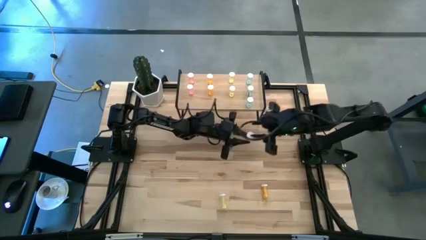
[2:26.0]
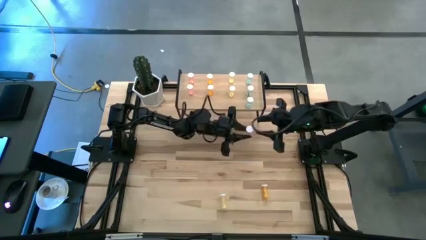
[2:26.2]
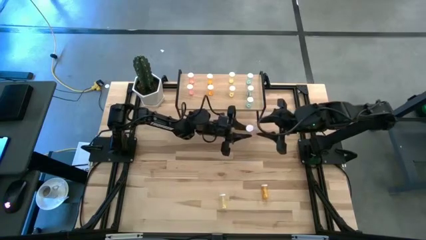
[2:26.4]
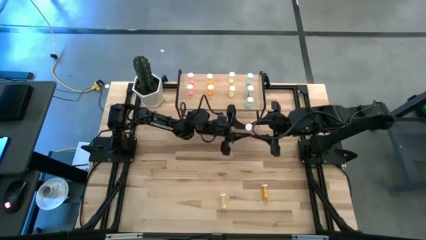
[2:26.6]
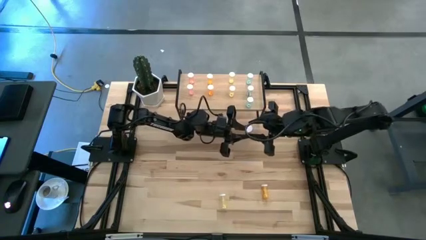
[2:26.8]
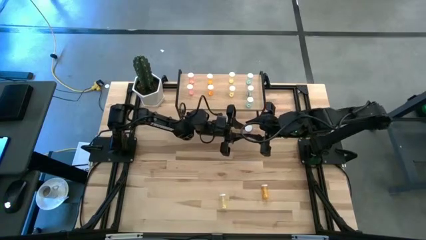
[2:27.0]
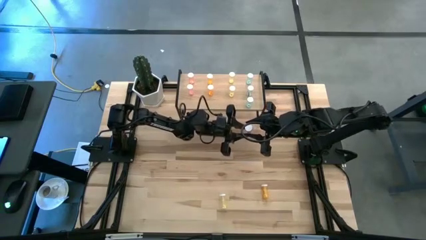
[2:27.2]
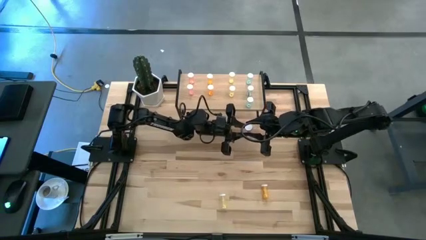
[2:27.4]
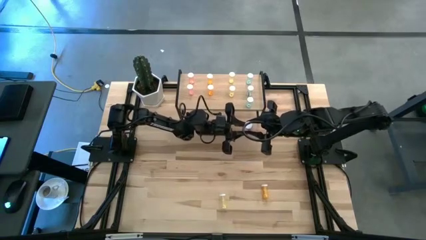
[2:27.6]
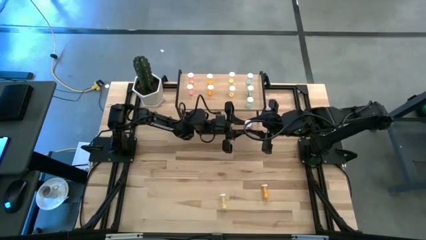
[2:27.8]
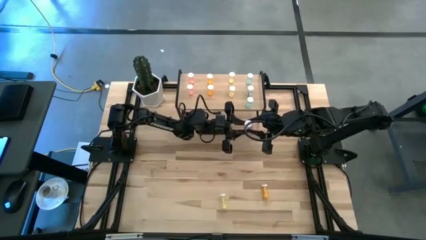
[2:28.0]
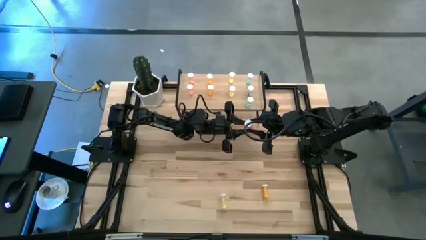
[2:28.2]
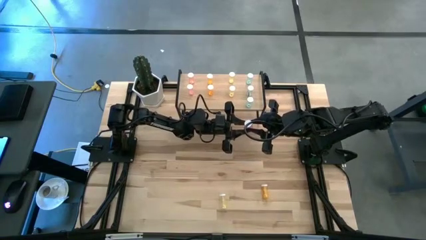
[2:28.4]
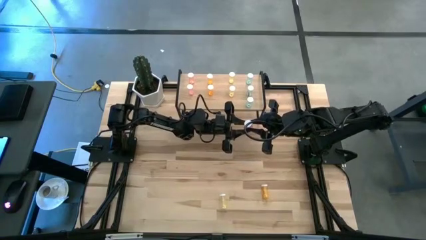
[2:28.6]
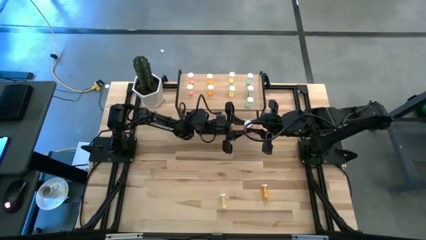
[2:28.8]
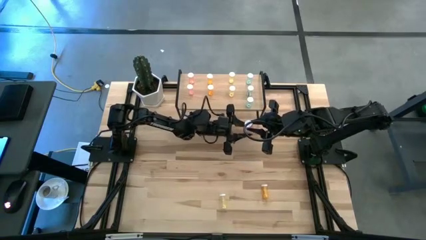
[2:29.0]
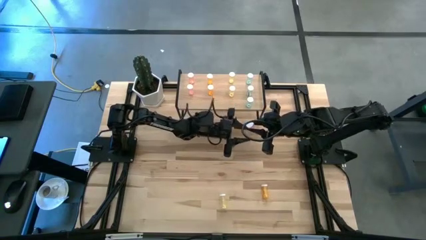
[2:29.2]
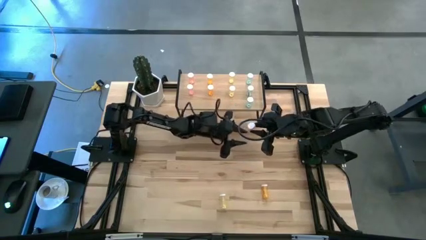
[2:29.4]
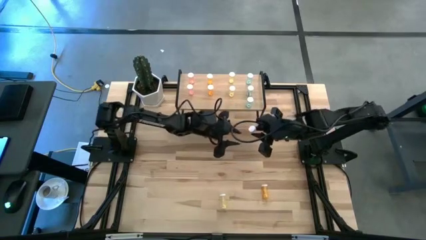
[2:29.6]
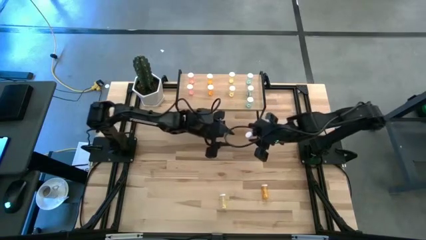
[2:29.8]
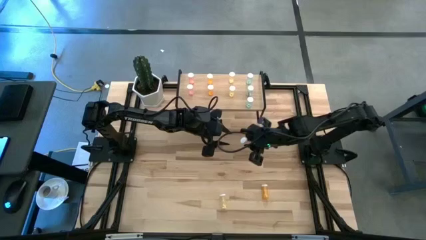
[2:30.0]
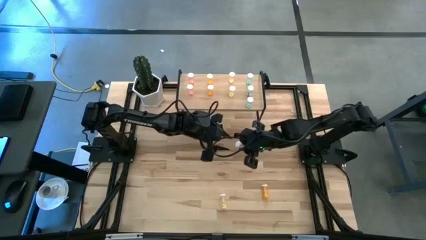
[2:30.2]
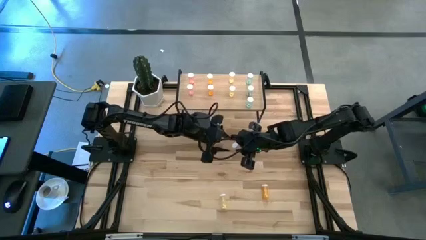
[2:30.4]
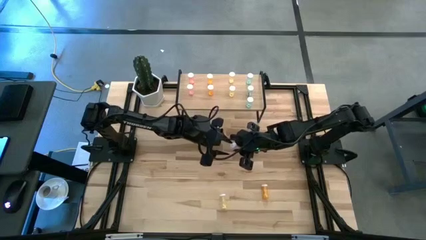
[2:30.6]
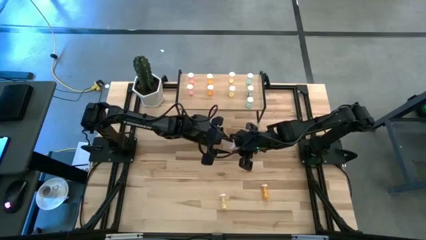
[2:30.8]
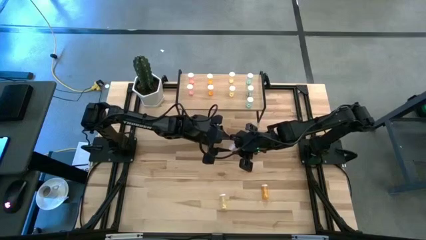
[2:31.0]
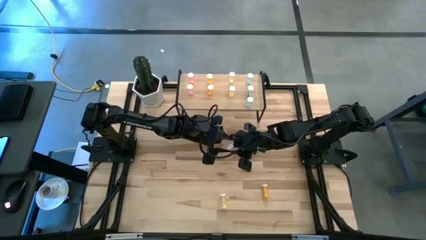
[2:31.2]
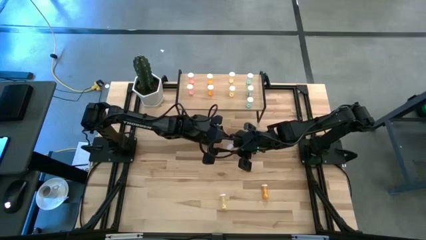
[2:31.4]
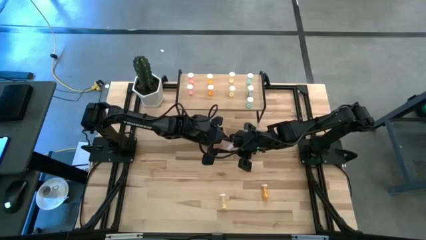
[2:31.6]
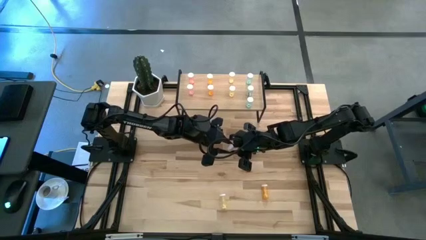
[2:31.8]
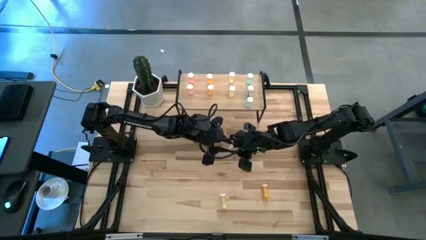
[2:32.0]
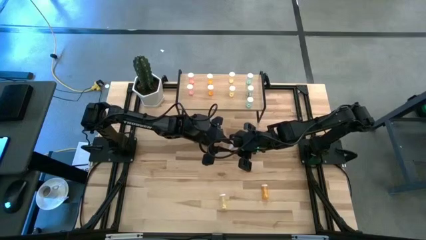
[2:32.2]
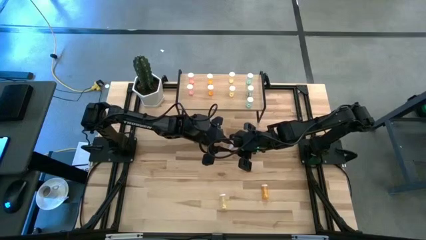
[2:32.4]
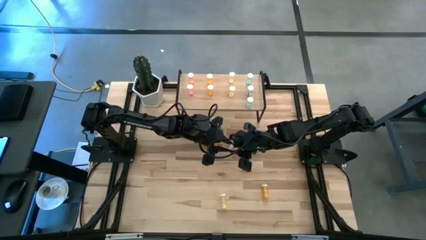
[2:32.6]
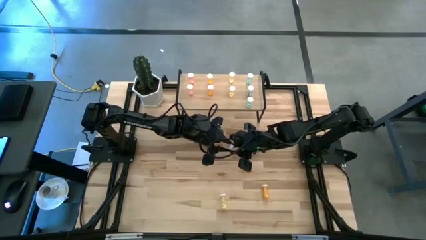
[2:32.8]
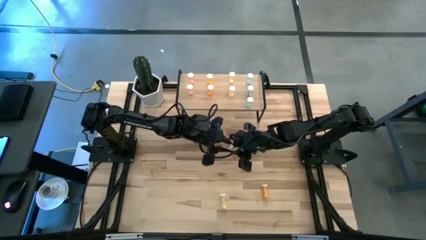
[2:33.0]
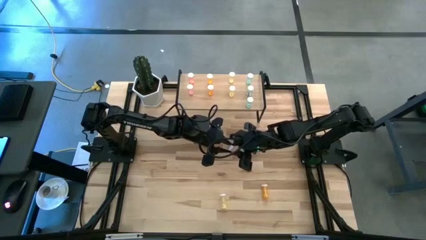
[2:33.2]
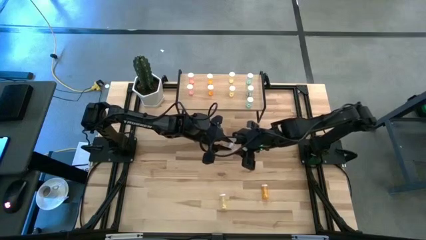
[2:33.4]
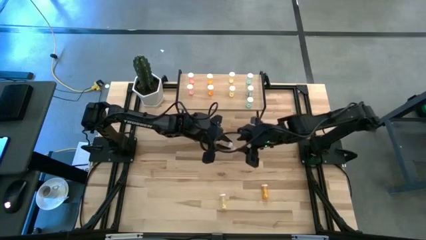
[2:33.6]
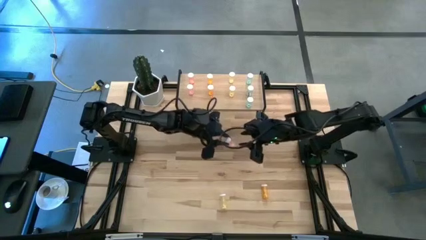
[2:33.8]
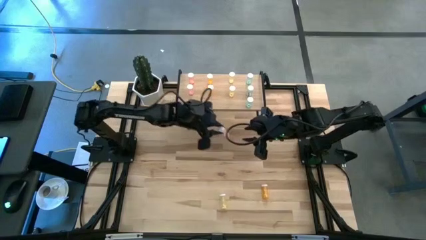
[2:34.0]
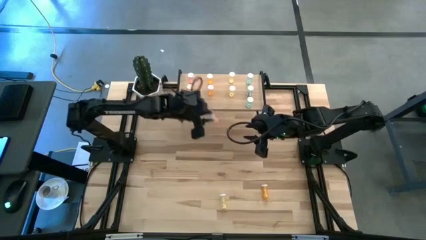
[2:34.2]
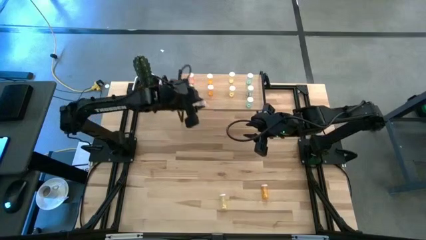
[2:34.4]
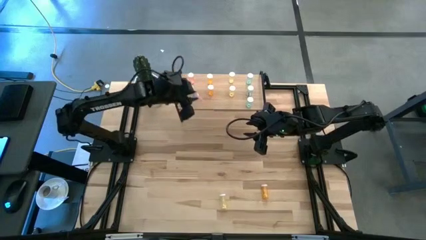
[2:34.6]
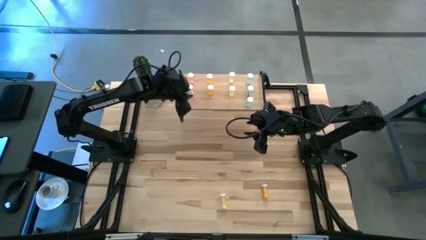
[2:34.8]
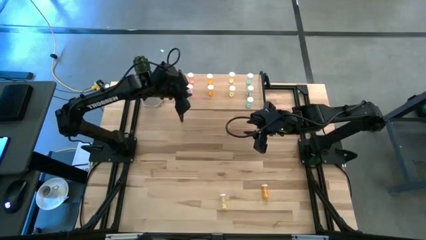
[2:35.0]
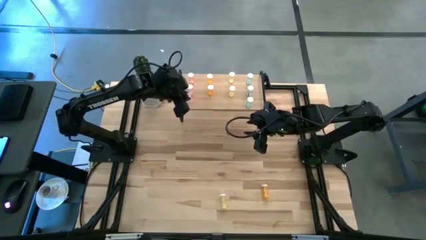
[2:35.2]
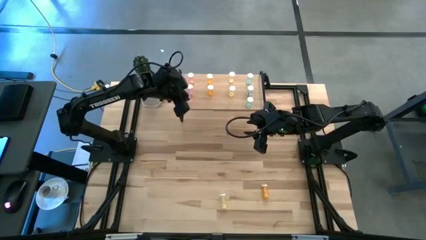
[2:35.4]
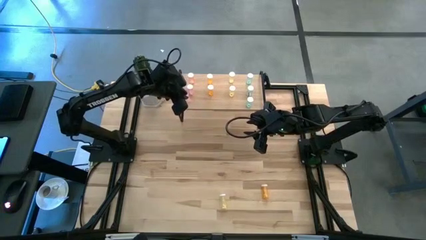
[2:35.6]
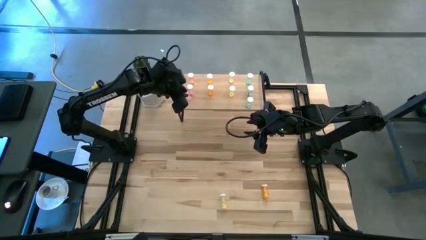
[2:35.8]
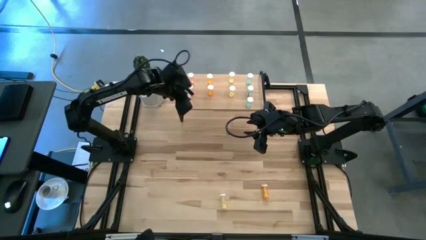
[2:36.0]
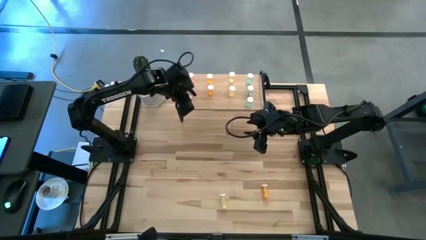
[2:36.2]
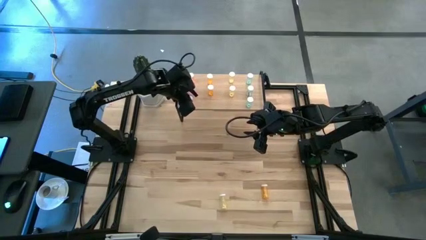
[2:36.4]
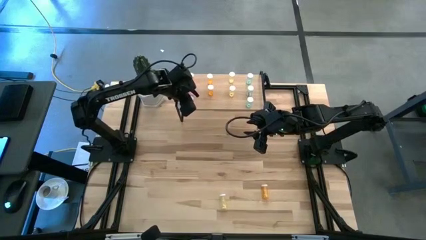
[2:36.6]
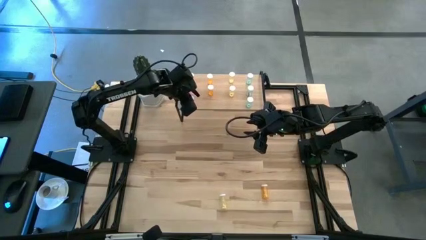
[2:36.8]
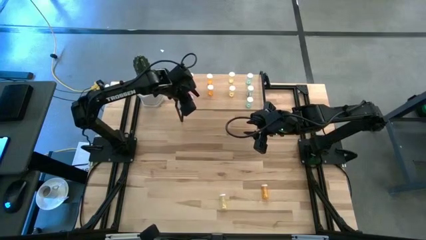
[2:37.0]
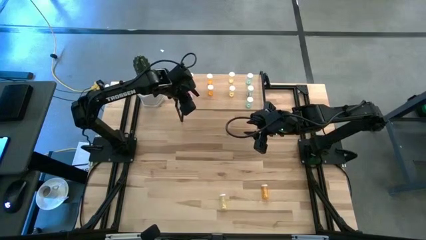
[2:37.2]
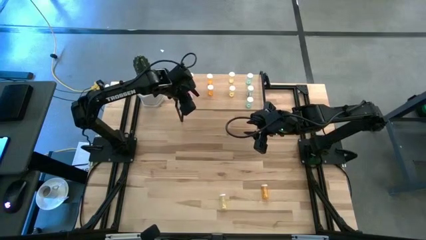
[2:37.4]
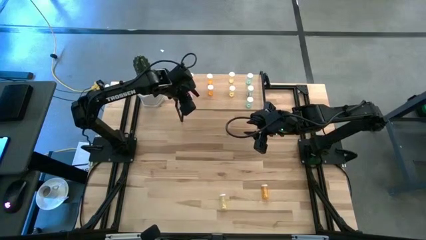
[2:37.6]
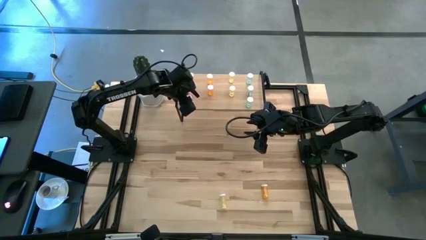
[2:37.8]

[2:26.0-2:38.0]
Task: Pick and place medicine bottles onto shelf by color
Put the pink pill bottle aligned with other pink pill bottles on the shelf

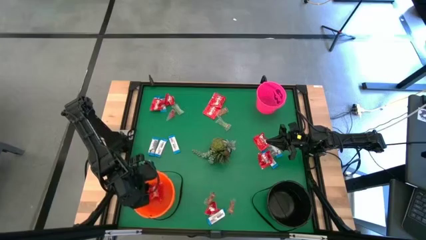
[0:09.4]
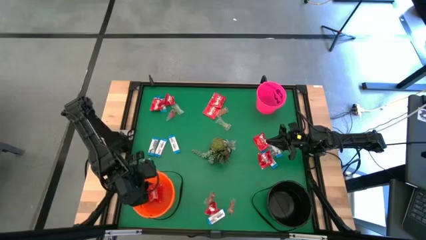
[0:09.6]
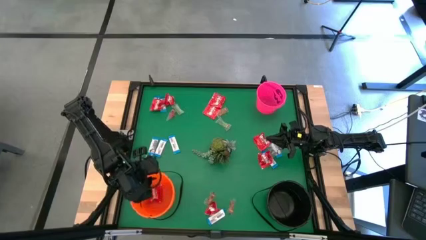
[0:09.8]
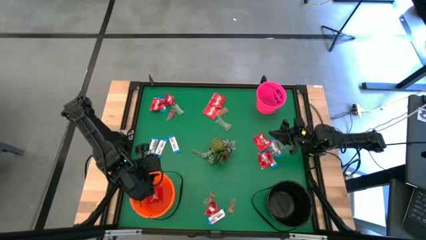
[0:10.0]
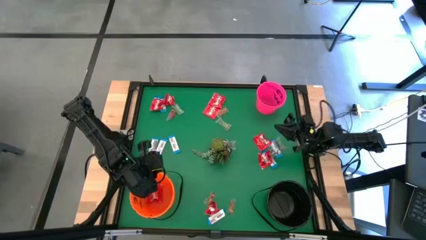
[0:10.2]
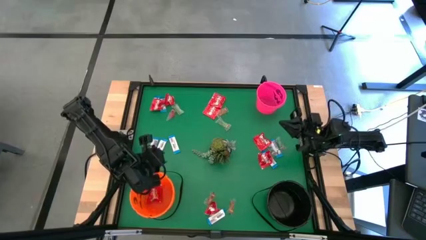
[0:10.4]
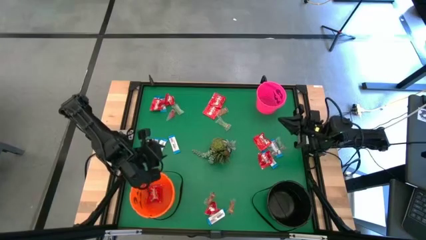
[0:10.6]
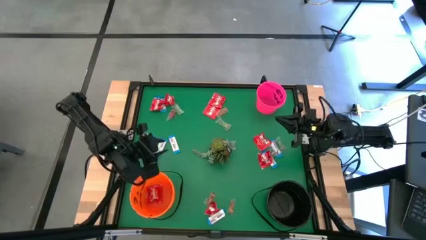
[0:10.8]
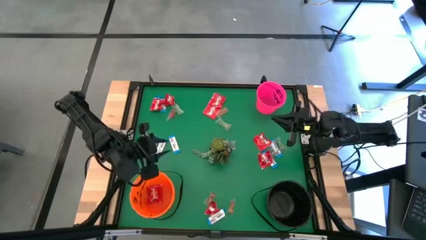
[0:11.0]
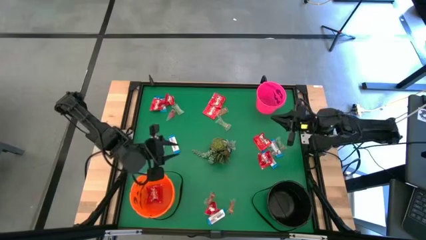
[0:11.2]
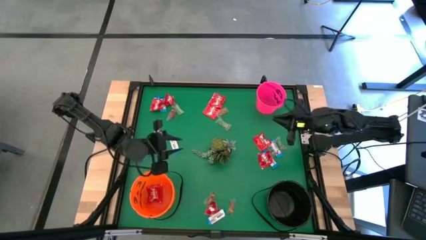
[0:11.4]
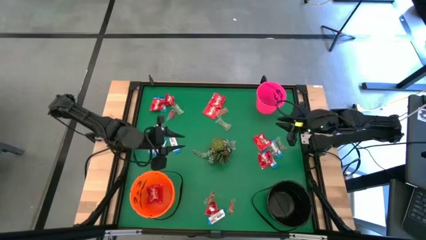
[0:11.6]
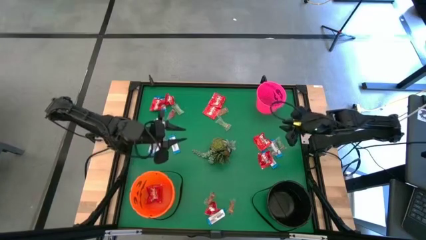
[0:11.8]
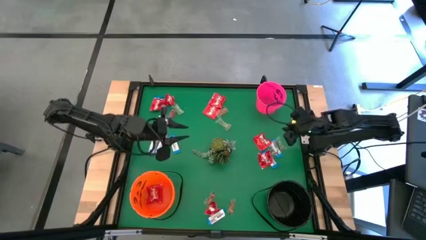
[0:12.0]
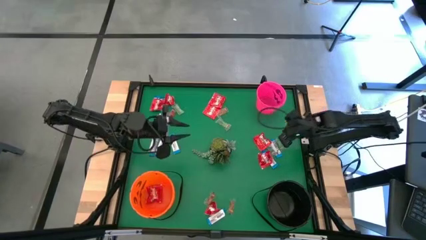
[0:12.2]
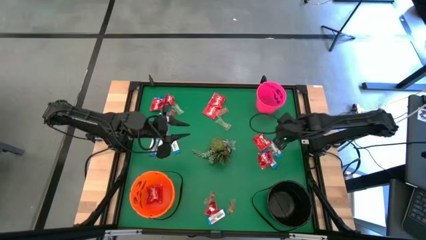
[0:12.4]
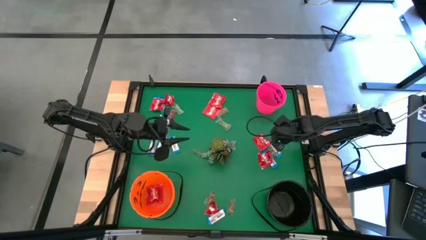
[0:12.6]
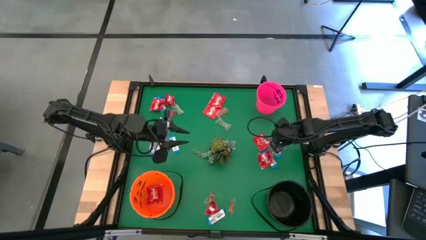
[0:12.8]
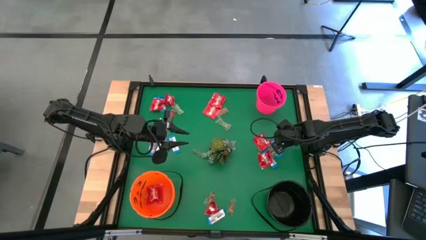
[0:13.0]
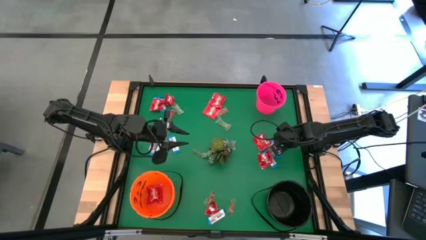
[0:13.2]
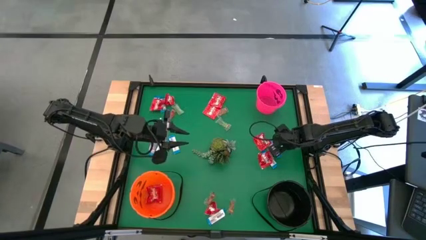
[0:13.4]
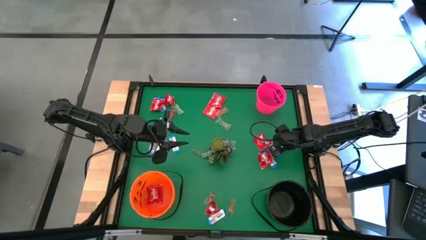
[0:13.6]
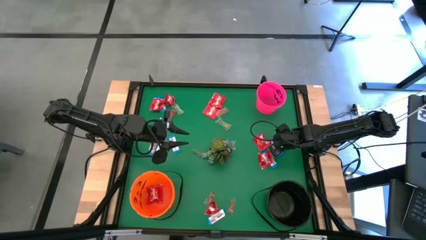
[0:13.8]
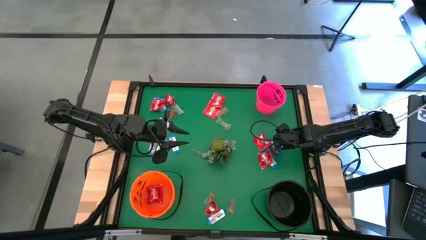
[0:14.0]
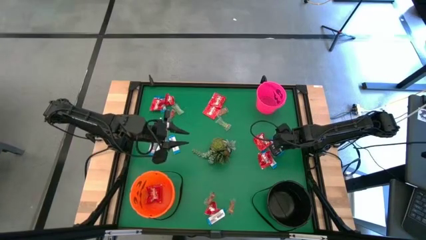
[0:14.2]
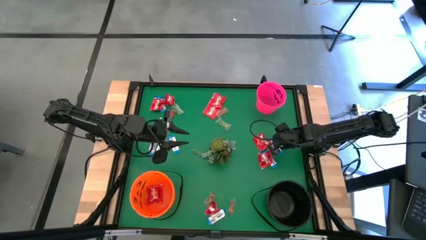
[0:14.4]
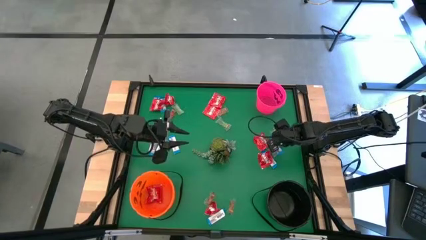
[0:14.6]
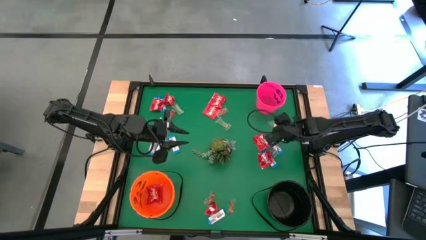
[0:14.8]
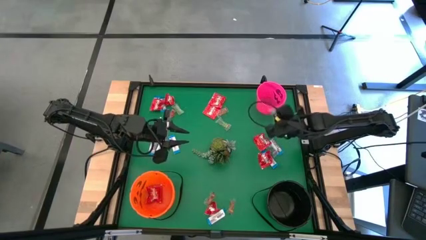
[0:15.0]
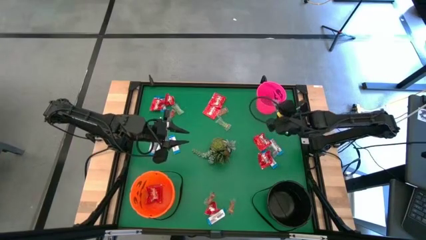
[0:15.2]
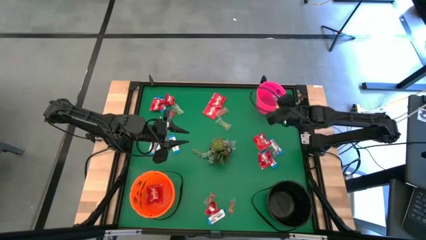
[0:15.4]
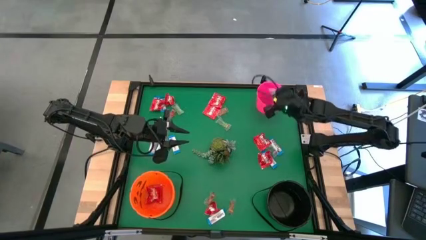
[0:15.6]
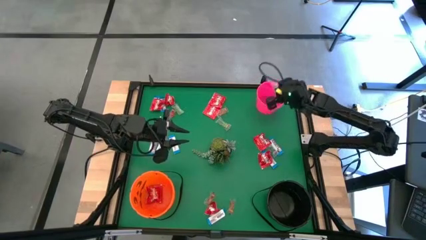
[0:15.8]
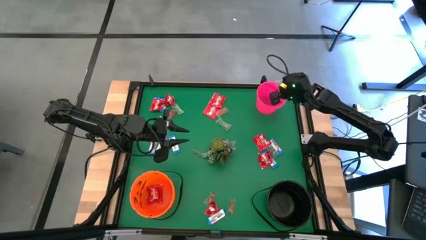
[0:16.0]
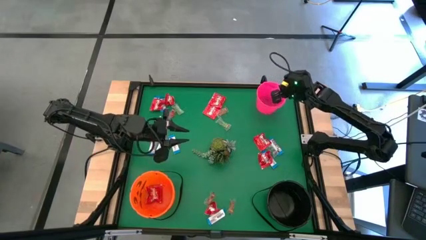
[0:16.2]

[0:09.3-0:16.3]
Task: Sort candy
Put the green gummy into the pink bucket
